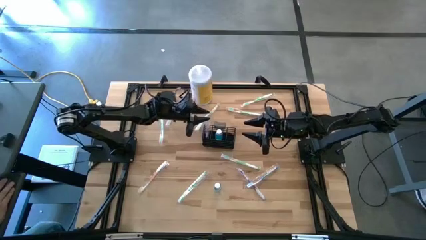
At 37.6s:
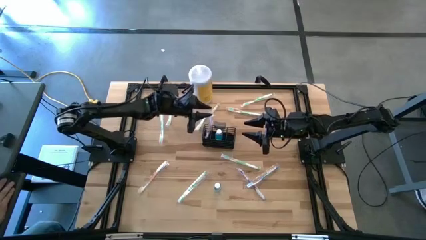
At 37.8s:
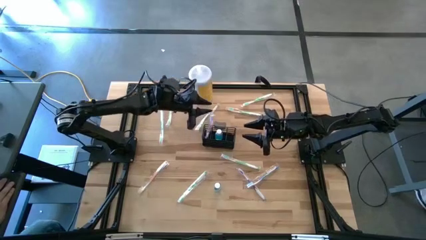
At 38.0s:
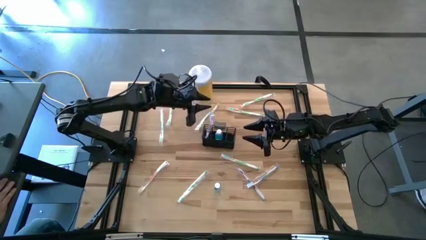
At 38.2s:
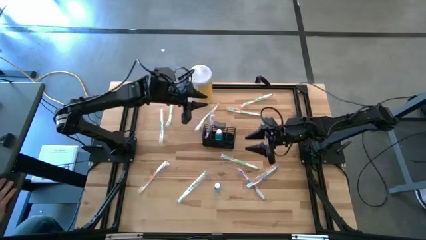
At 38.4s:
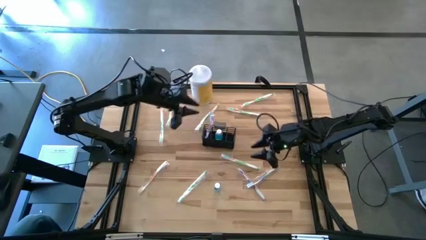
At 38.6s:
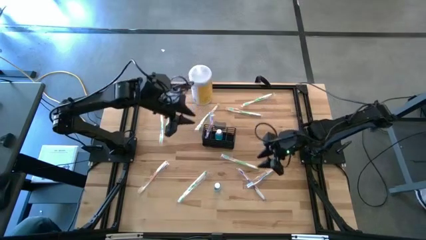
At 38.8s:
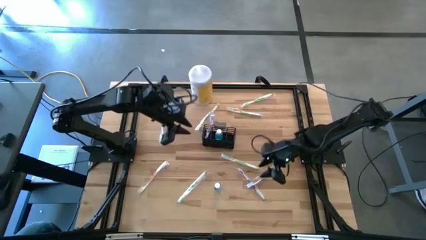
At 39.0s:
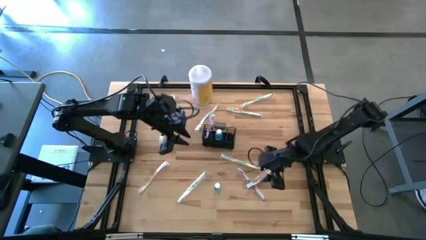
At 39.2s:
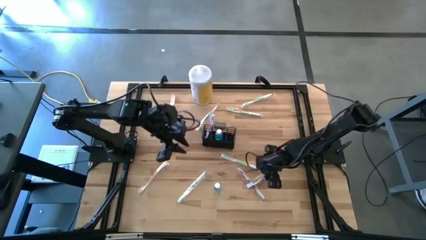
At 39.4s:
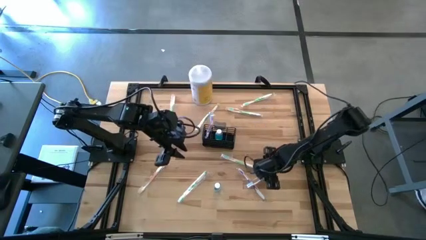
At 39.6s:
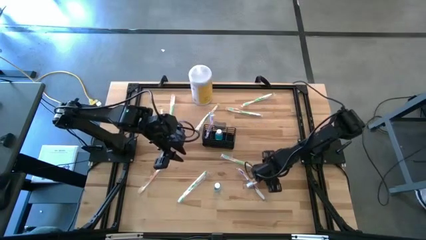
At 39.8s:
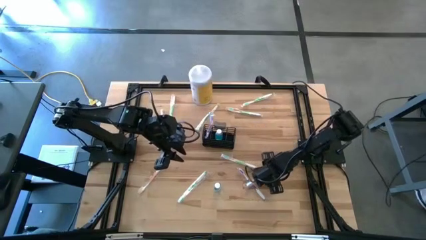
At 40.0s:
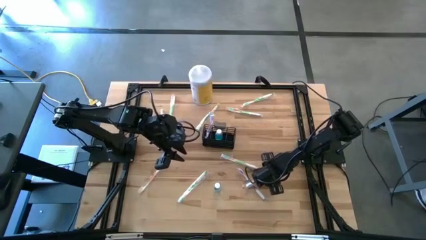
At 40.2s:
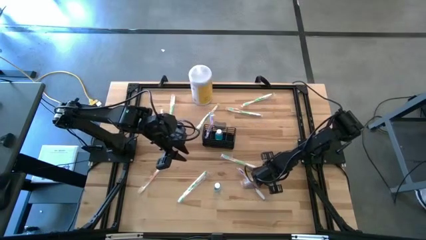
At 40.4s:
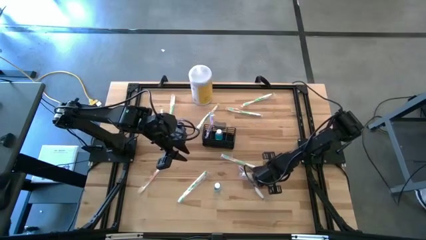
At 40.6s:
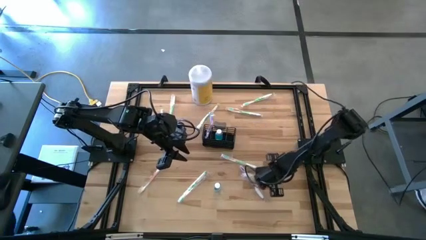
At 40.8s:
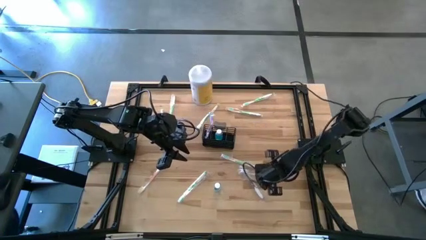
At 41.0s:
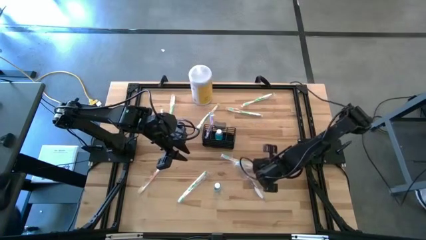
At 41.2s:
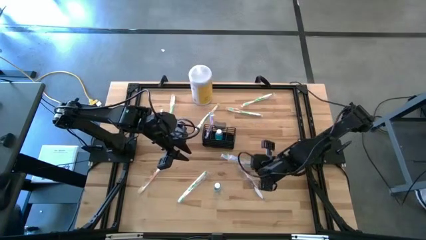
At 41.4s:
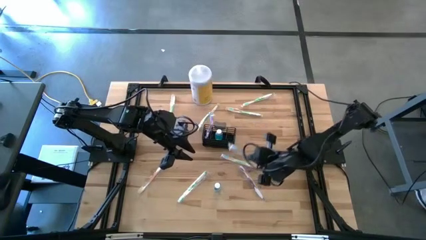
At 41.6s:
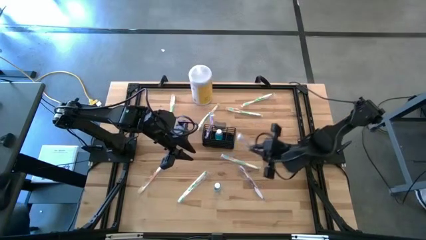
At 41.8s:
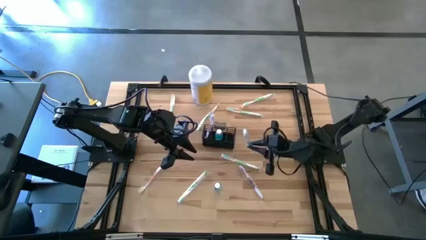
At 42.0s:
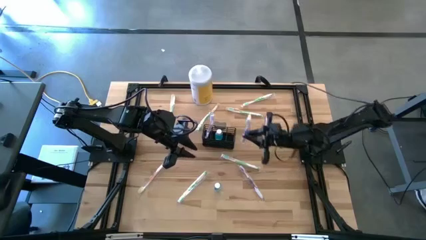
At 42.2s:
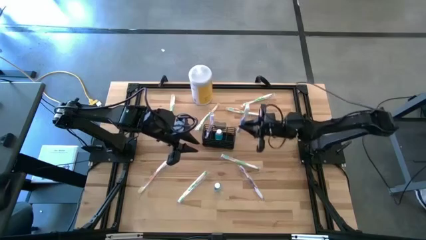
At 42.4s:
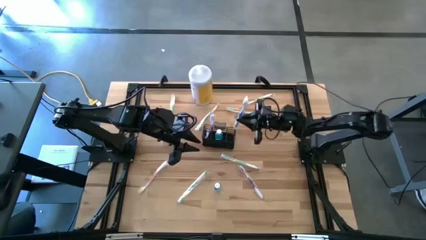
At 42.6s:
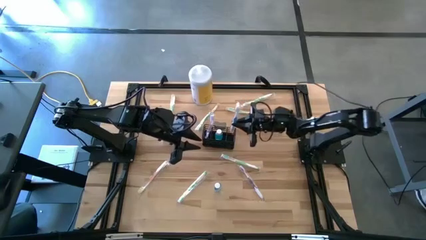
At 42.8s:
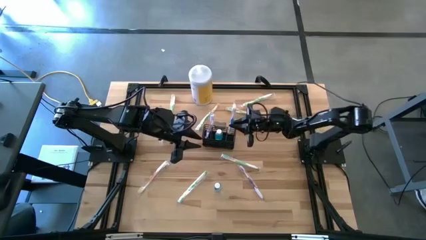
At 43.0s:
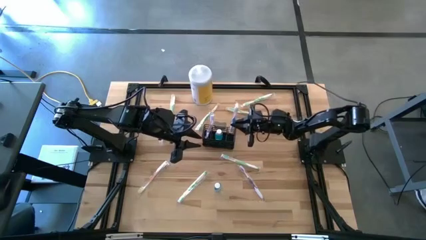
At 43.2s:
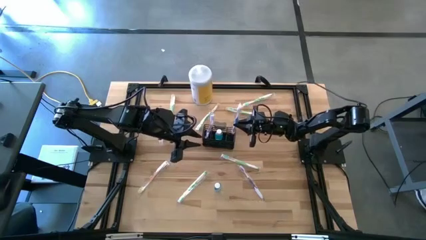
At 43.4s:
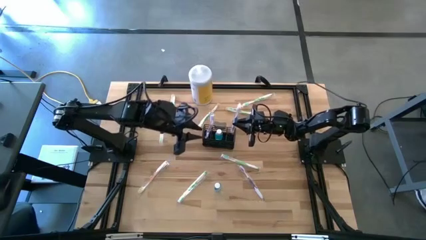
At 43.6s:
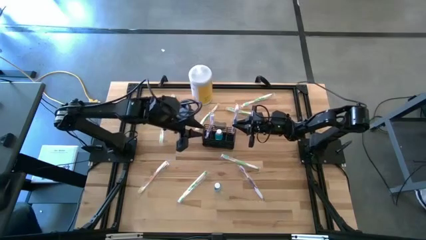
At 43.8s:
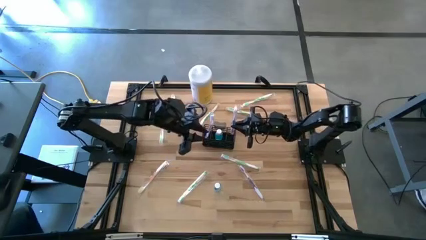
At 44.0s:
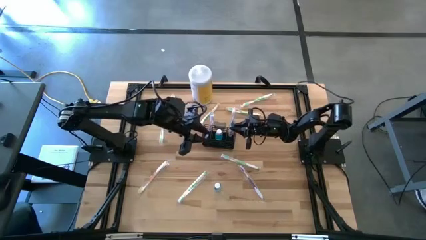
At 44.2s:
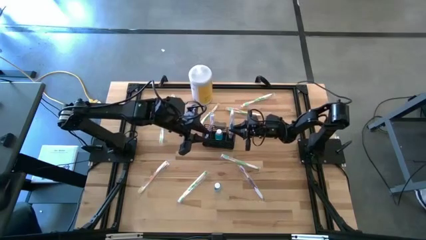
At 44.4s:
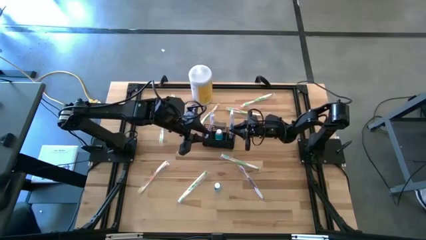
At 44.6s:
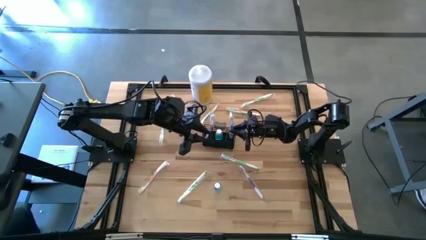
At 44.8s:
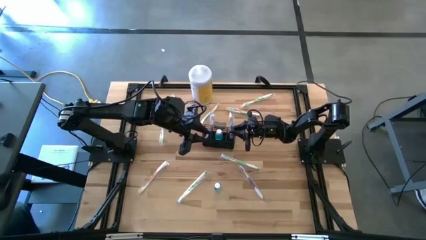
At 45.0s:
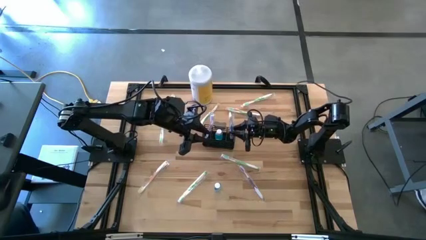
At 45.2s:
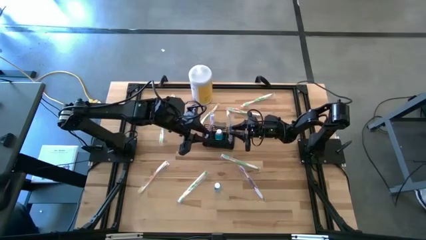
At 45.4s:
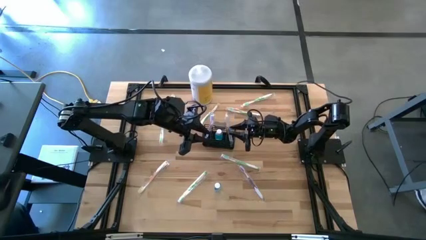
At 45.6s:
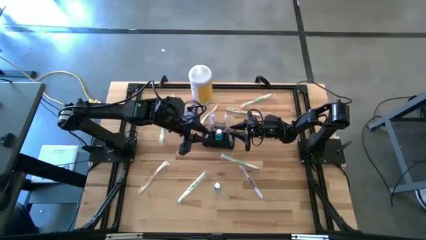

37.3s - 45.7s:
Task: Pick & Place toothbrushing station
Put the blue toothbrush into the right section wire organizer

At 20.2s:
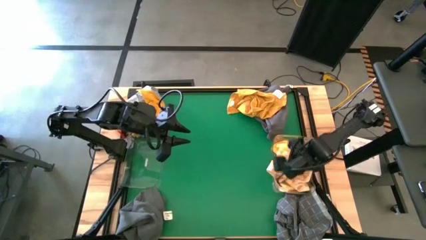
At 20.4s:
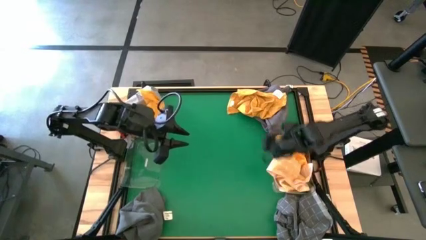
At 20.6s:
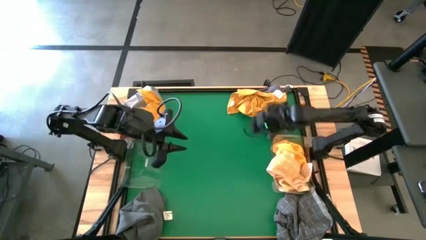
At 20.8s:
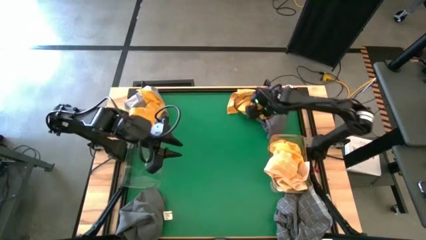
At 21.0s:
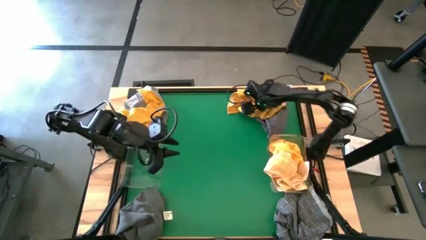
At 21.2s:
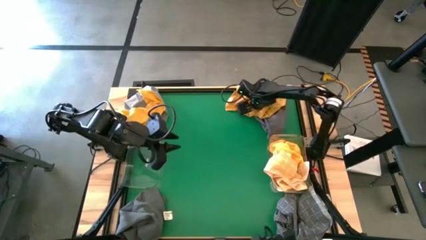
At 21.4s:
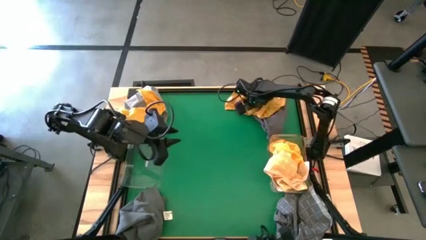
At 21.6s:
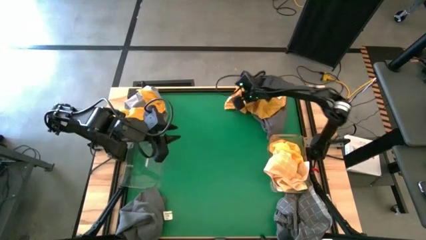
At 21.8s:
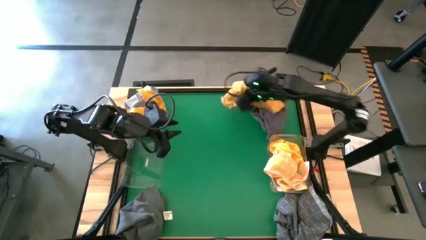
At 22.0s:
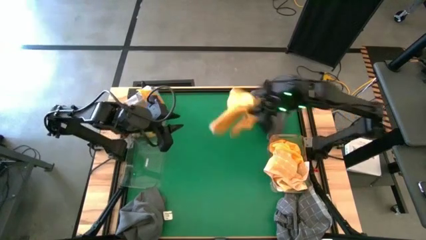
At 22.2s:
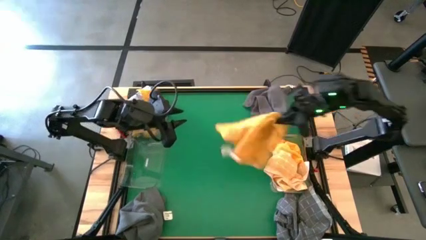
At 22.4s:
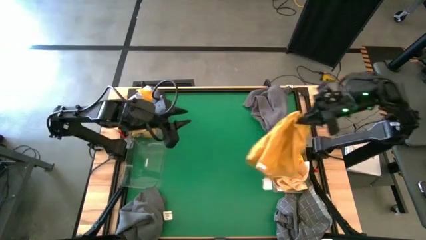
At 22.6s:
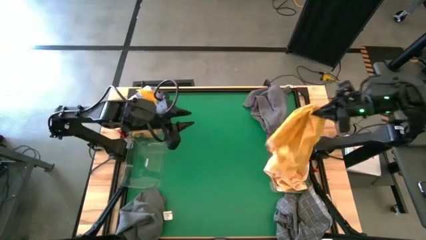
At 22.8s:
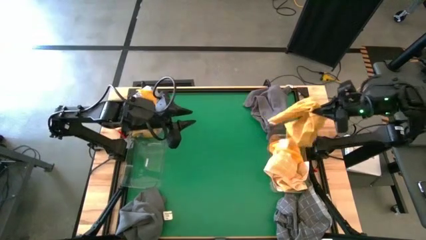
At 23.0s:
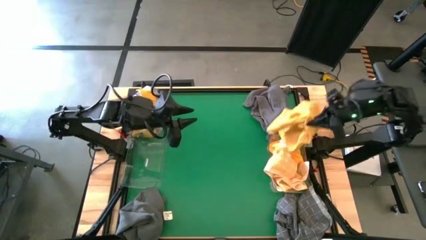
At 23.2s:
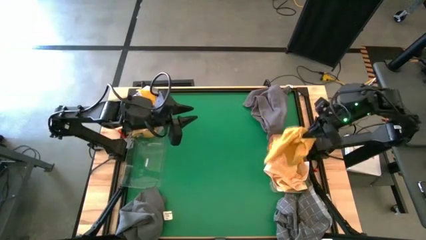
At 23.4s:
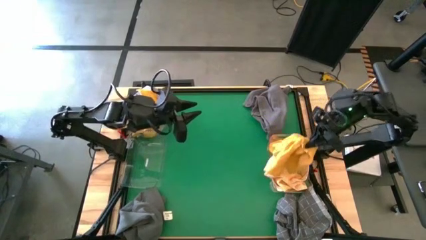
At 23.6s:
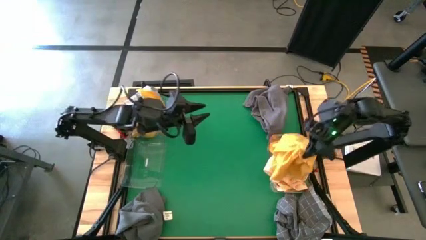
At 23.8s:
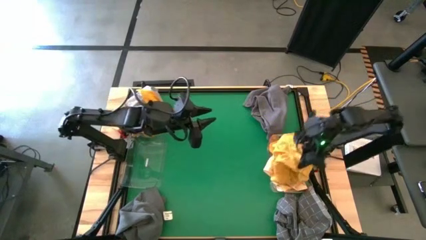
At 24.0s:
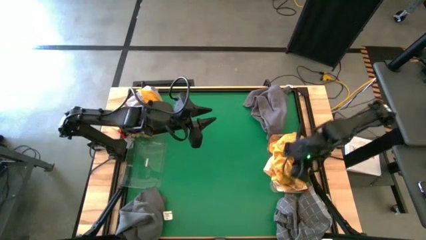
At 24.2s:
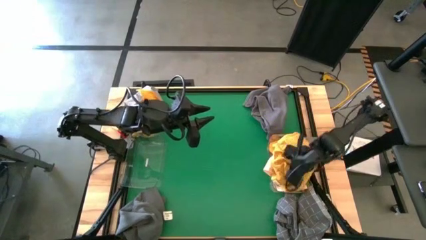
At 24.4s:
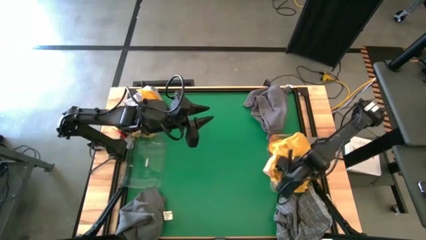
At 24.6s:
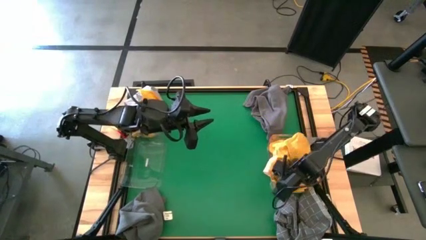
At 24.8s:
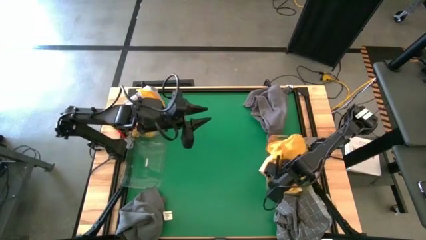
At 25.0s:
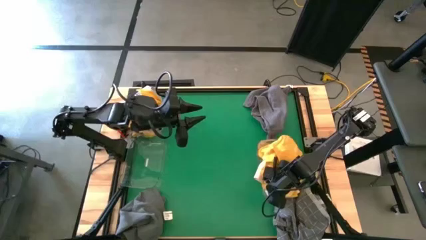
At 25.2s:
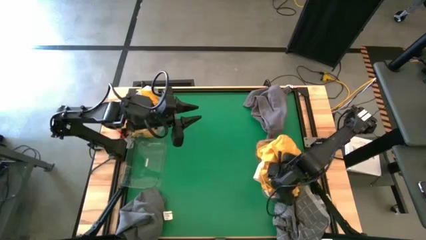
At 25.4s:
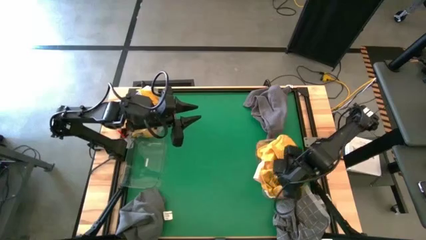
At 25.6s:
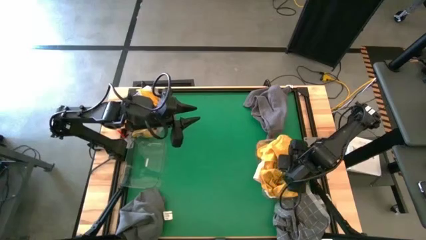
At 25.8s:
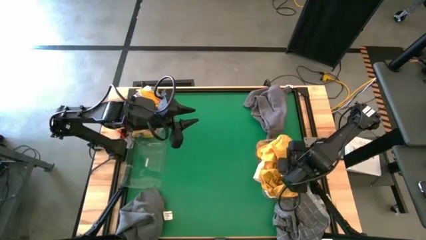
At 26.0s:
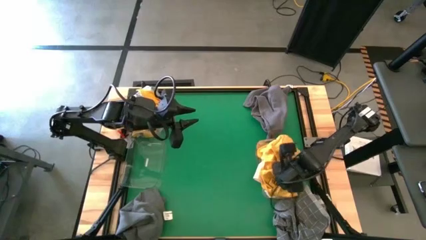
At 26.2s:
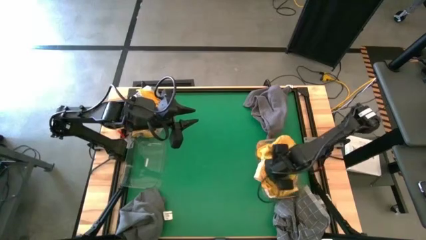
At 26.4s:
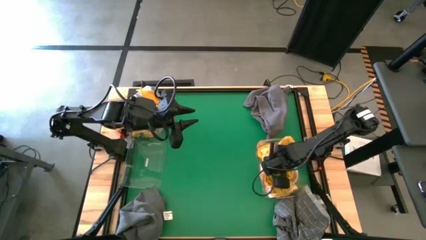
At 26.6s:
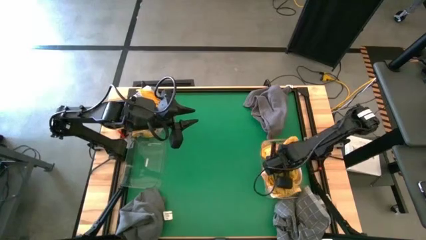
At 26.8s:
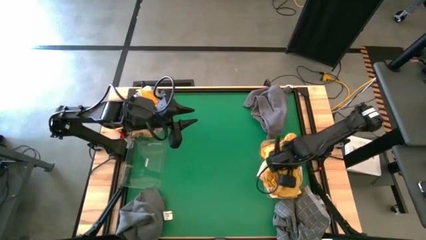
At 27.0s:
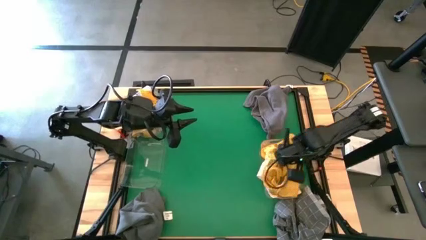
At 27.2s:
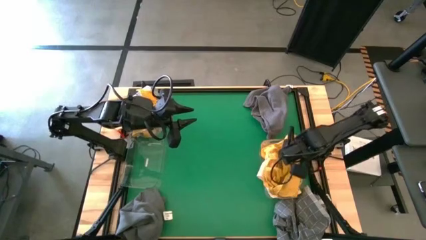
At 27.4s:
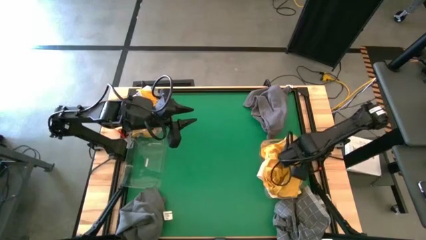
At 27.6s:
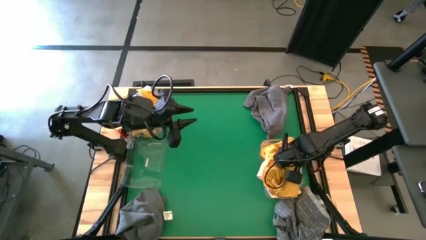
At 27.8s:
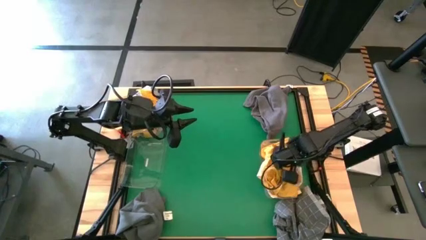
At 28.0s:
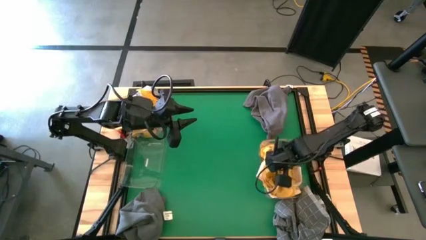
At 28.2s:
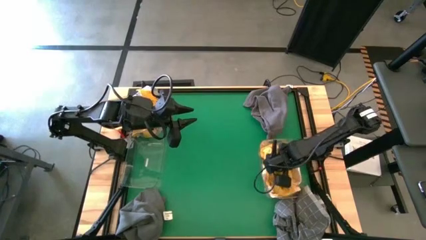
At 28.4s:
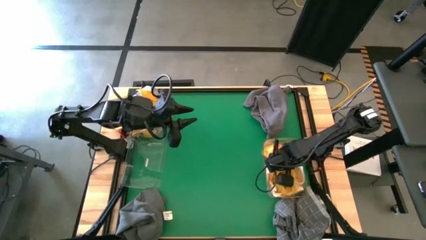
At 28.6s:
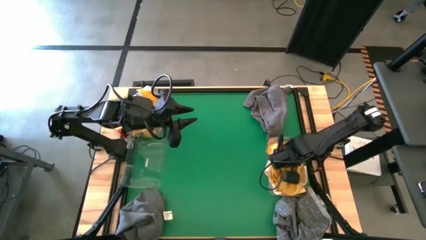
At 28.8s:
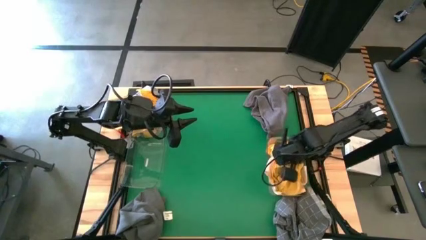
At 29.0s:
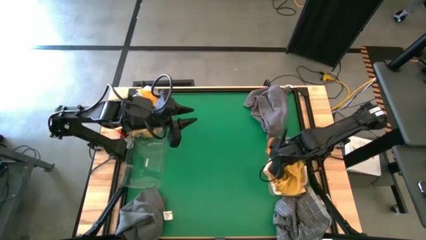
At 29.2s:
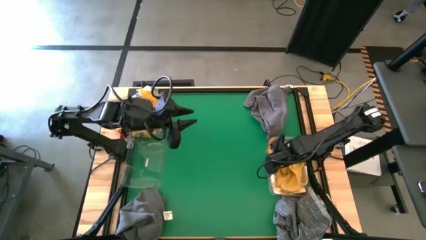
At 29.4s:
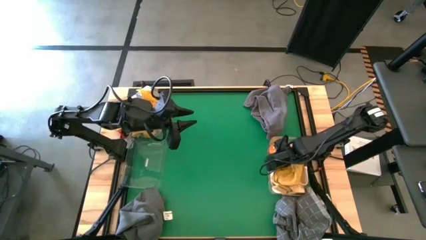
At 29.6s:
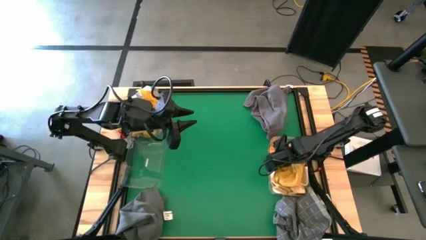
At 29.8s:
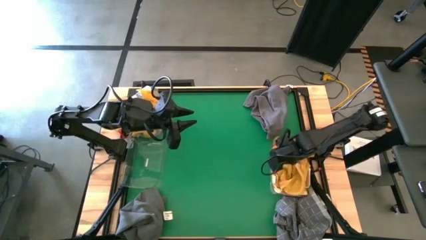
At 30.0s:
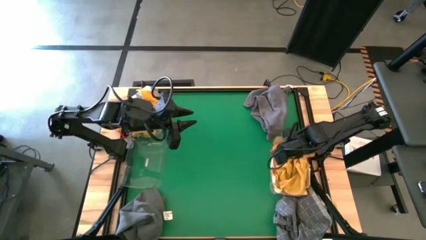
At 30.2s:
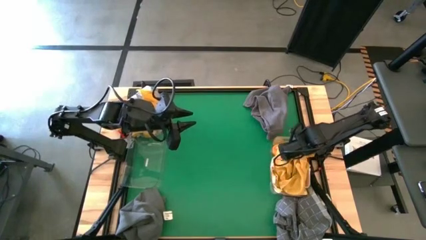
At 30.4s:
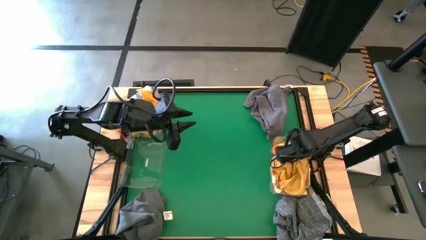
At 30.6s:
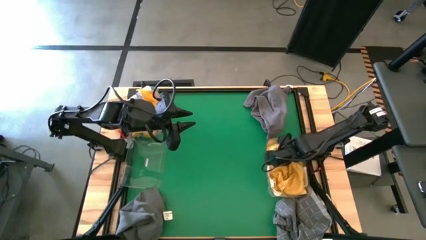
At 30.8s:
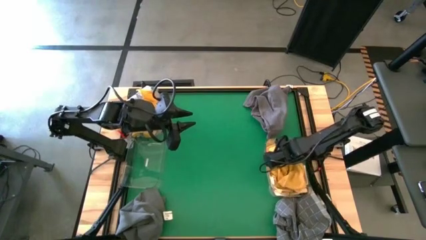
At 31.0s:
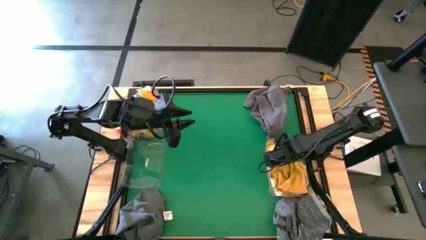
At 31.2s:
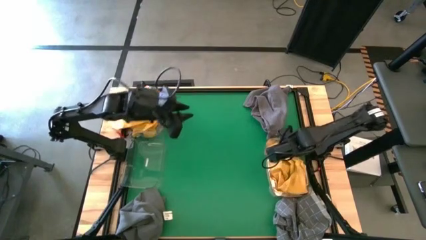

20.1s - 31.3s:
Task: Sort microfiber towel by color & place in baskets
Put the right orange microfiber towel into the right transparent bin
